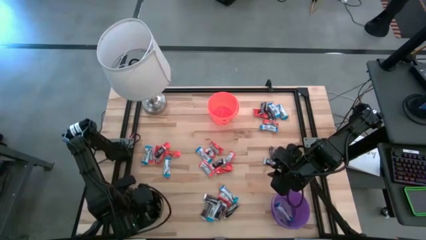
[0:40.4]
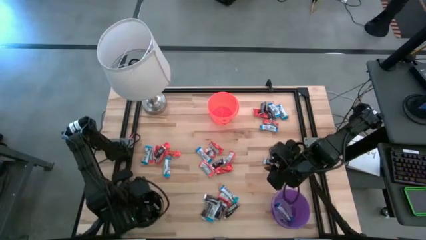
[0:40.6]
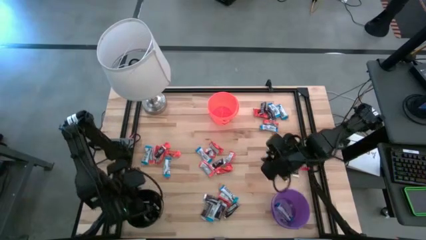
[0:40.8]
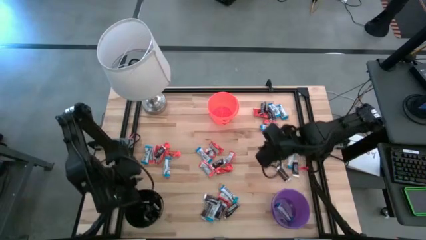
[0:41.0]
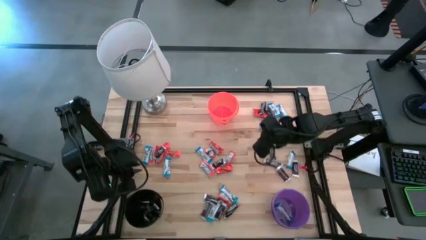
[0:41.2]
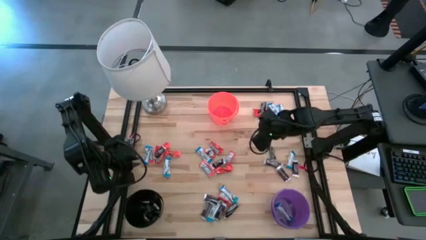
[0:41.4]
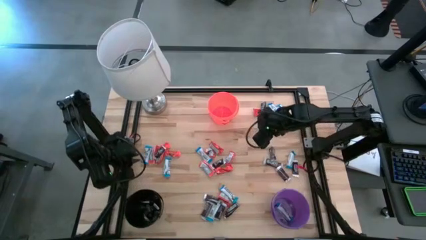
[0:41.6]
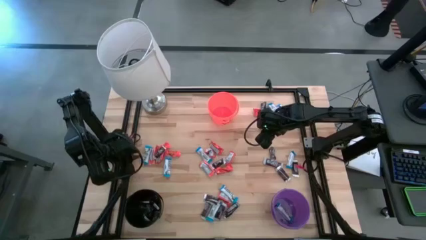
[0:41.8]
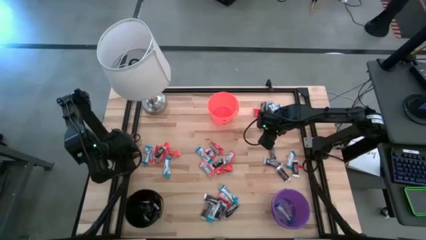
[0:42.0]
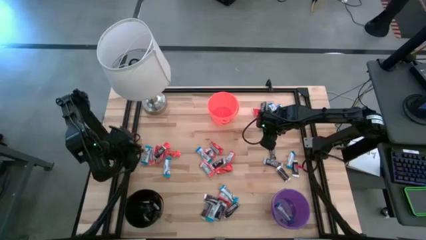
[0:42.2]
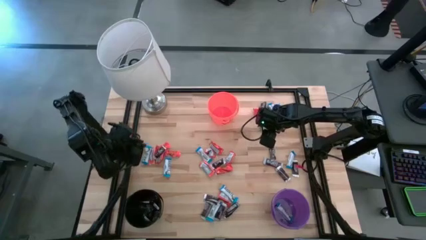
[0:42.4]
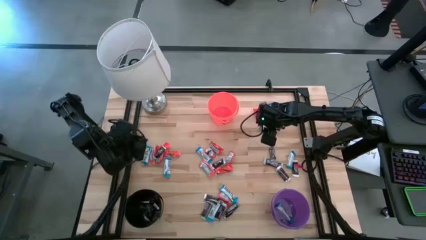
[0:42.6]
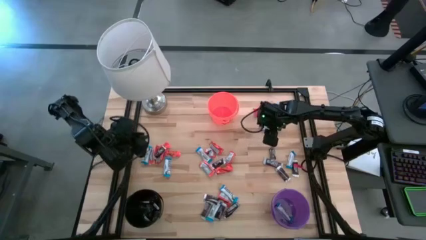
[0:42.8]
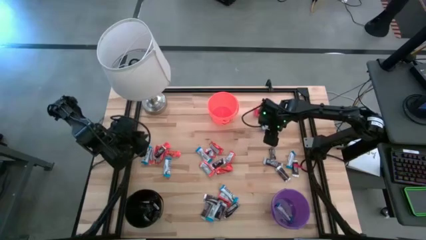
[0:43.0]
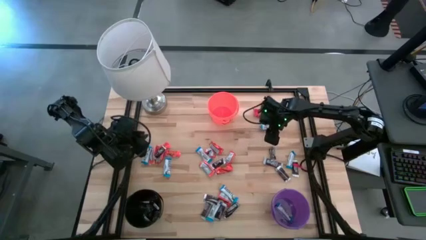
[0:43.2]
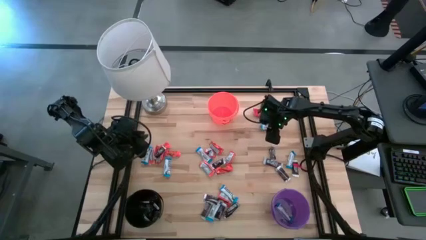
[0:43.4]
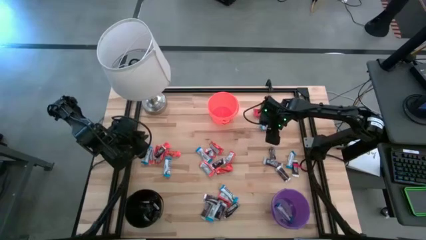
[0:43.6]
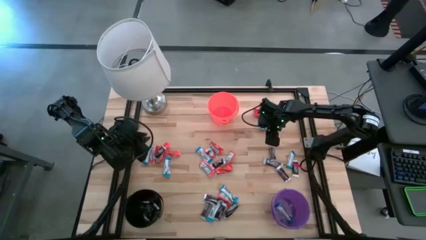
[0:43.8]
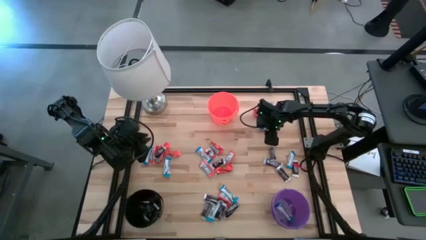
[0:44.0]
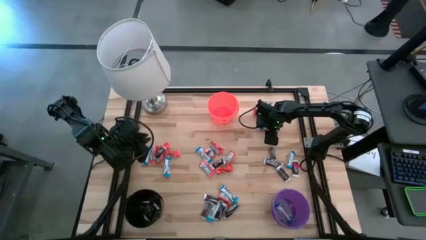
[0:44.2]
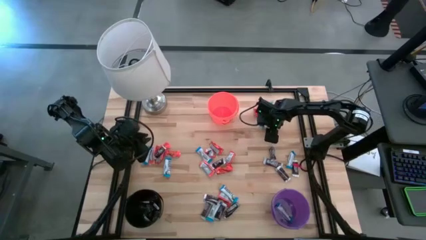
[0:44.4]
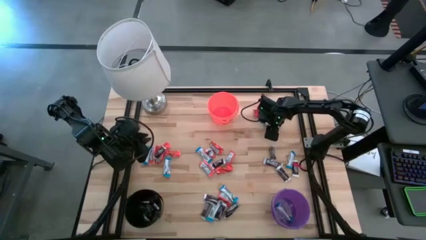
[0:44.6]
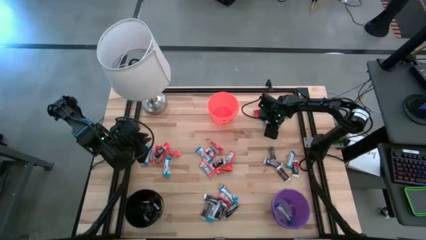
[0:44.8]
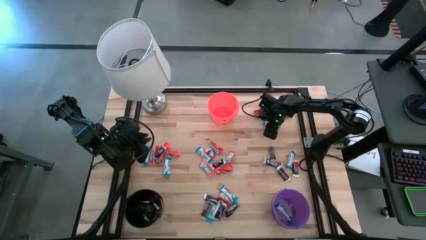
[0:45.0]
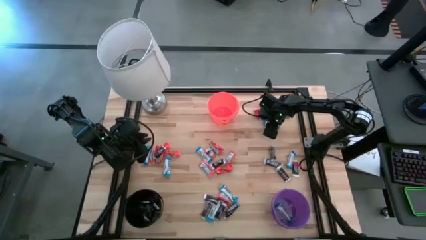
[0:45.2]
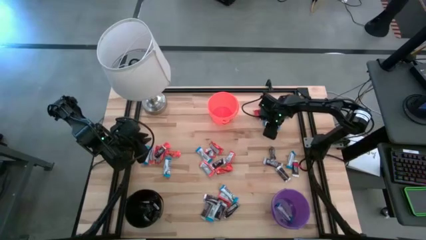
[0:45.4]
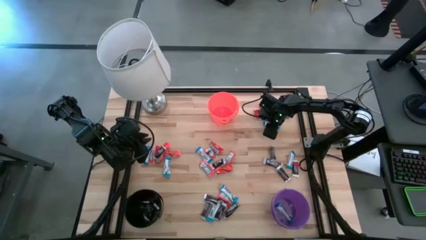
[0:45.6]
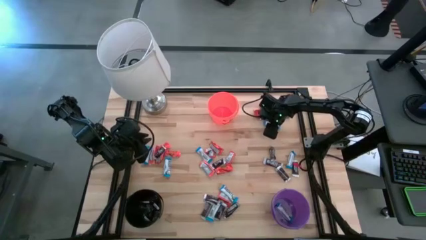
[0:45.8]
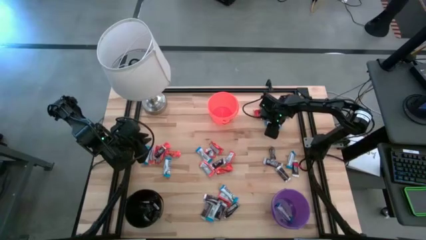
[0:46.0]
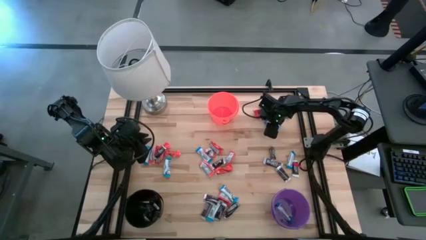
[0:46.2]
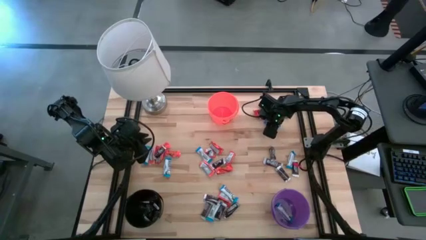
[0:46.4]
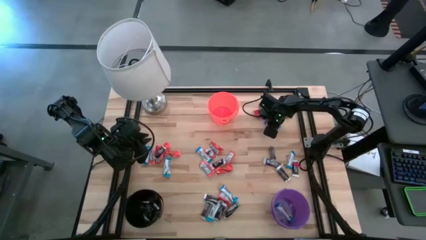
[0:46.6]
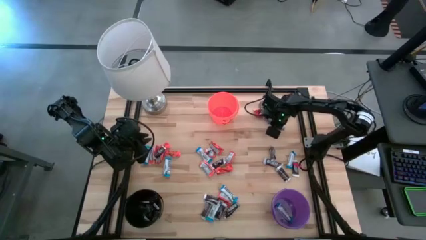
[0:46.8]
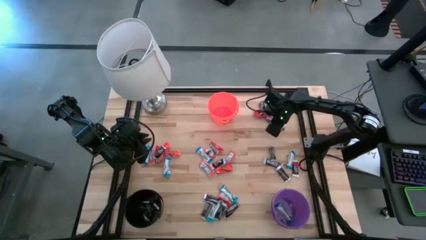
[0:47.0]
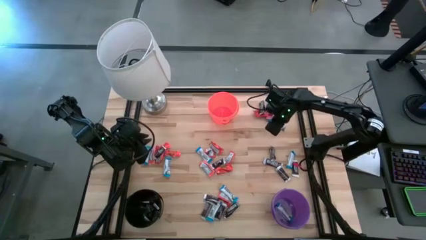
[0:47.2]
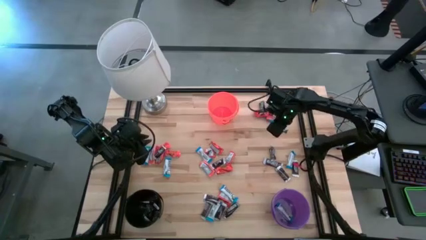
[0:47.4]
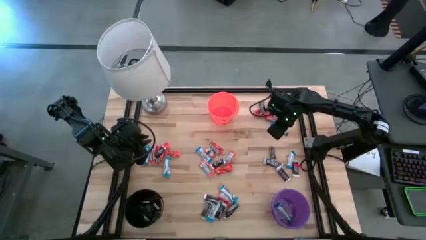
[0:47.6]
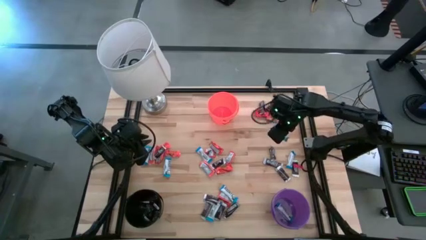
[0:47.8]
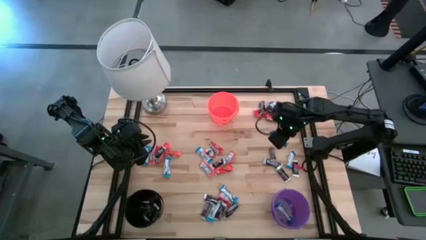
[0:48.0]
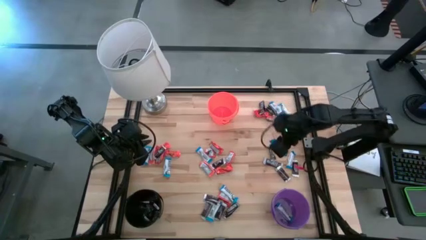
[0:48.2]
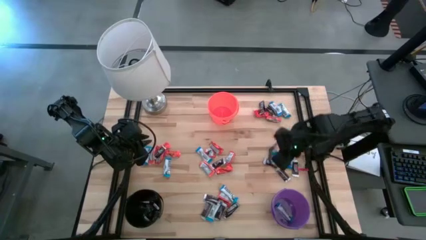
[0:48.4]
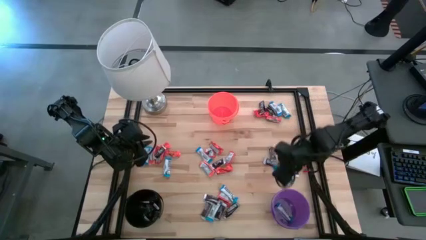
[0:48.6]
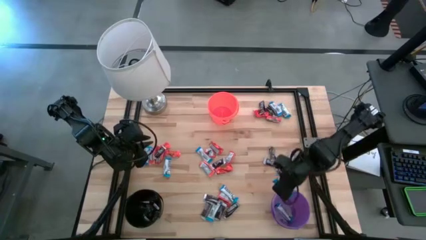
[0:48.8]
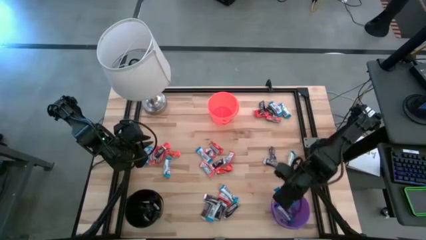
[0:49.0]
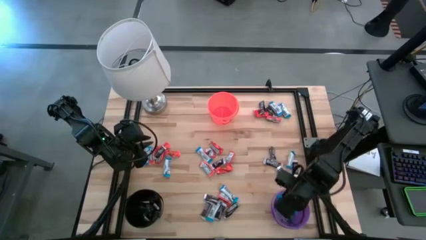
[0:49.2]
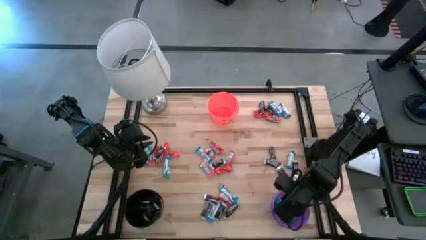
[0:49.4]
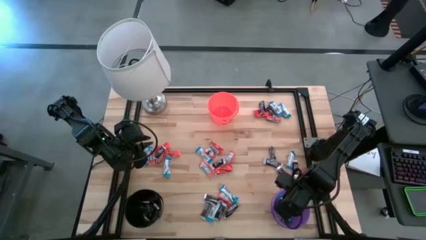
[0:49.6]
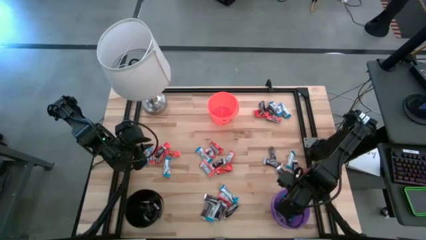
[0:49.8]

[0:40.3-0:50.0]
Task: Organize candy in baskets
Put the white chocolate into the purple bucket

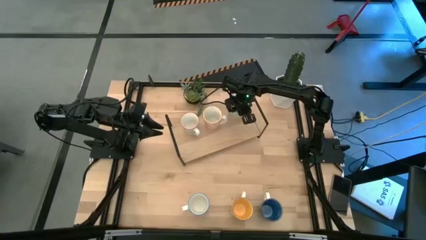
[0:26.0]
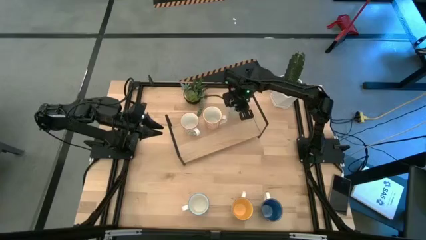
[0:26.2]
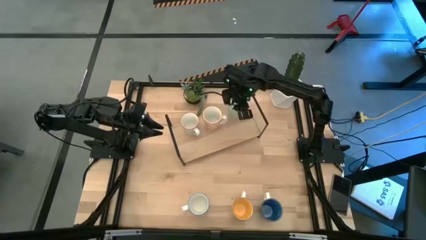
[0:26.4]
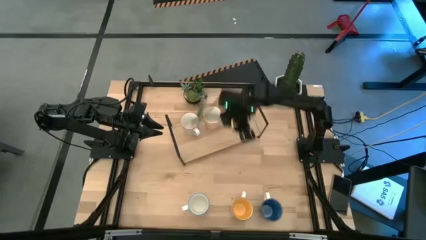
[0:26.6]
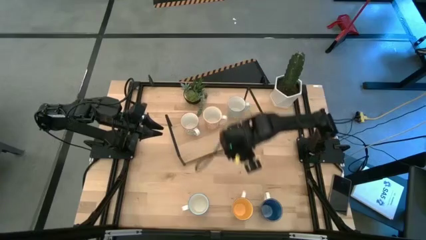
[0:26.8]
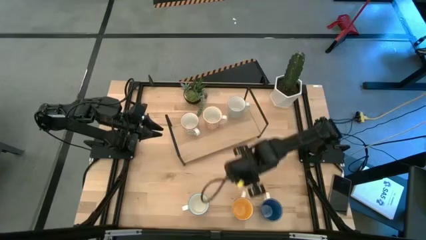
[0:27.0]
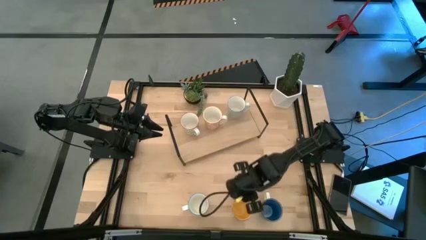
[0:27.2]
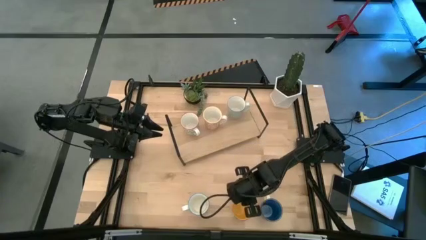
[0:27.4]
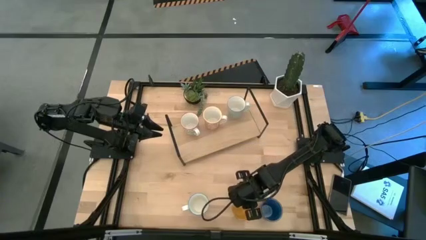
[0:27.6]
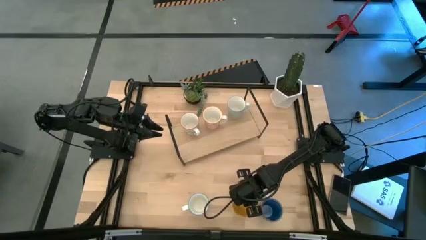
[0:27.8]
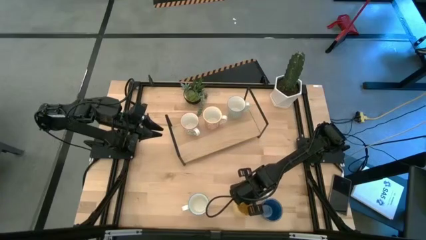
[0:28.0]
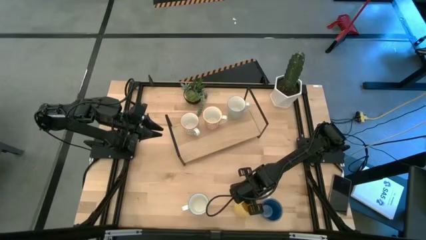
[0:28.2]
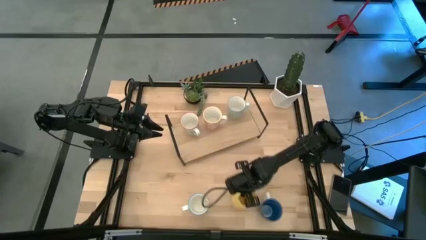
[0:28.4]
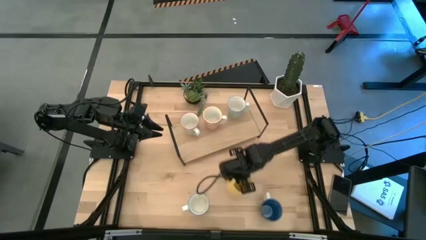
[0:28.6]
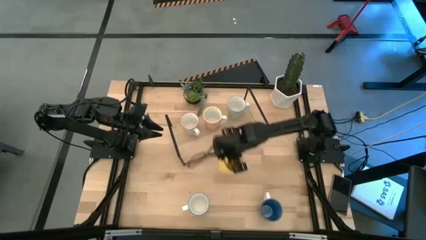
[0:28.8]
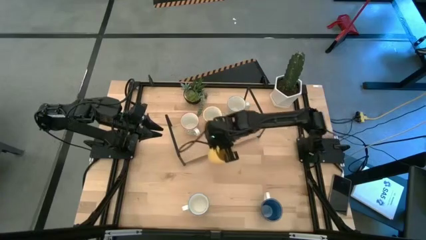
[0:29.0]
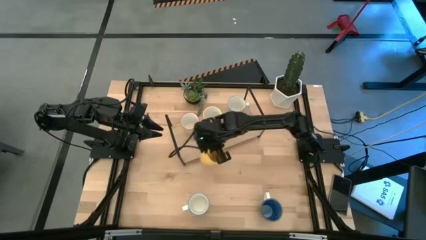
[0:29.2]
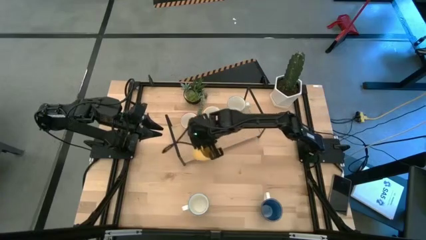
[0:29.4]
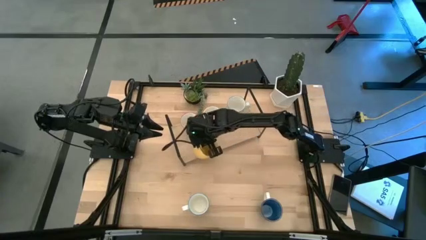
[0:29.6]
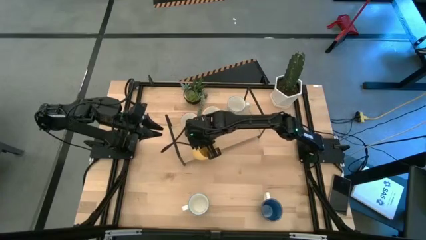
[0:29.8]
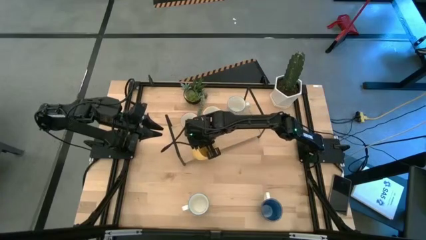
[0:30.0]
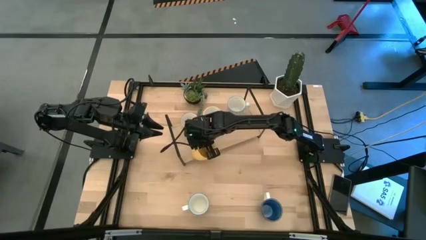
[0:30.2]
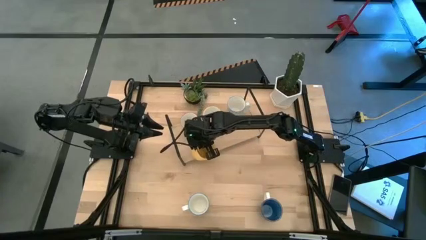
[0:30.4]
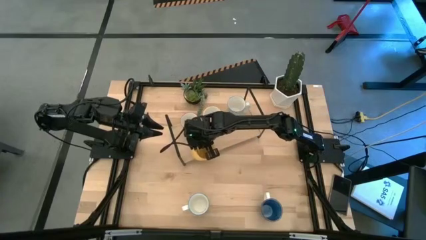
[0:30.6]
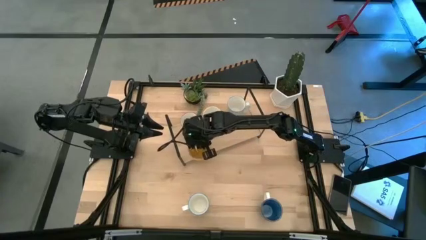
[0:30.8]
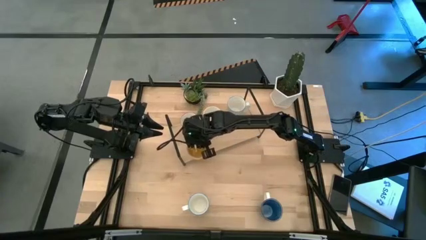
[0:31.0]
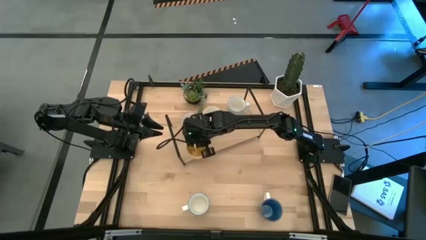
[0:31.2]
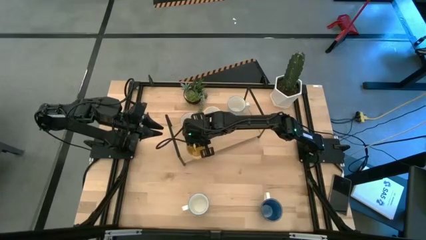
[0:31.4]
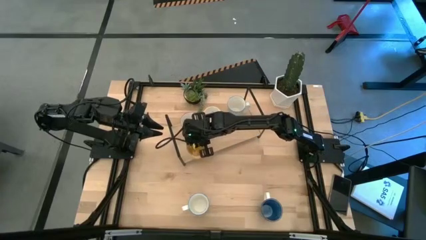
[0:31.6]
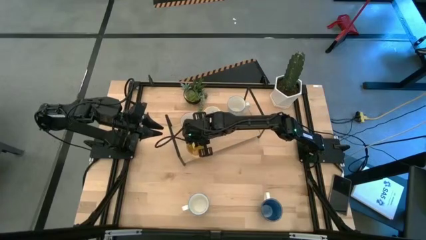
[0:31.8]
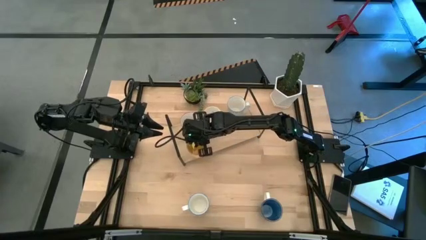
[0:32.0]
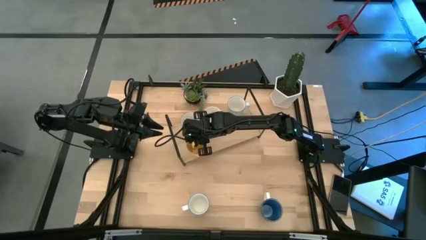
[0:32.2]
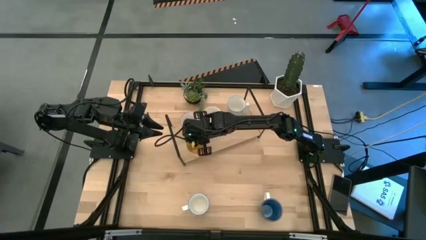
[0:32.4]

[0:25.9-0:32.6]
Task: Place coffee mugs
Put the yellow mug on the shelf
